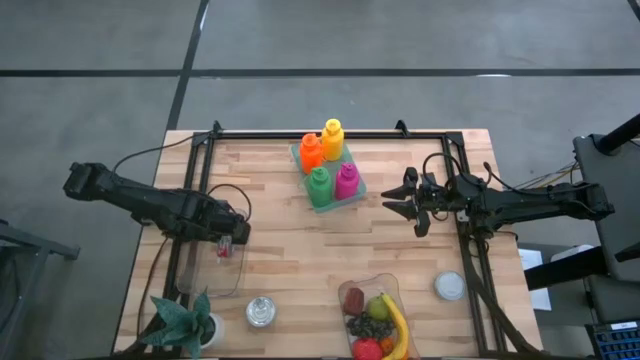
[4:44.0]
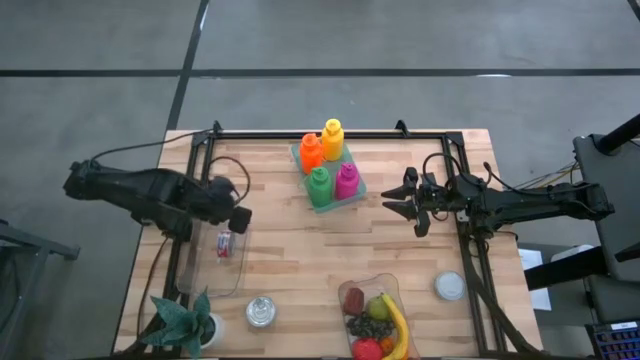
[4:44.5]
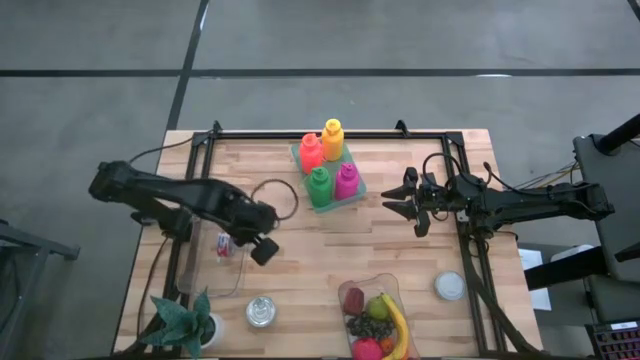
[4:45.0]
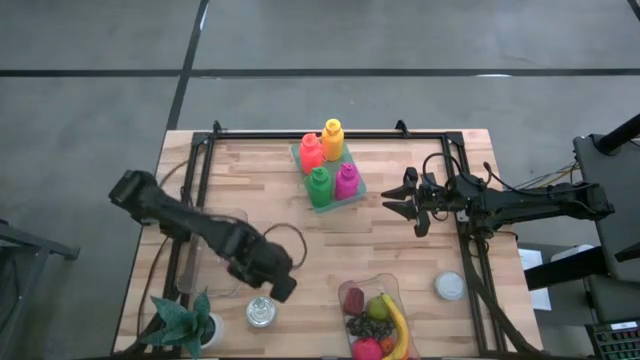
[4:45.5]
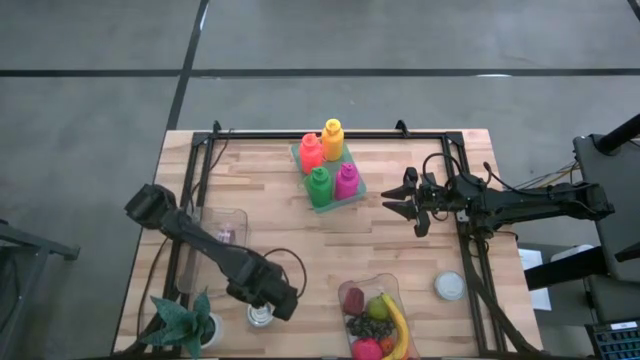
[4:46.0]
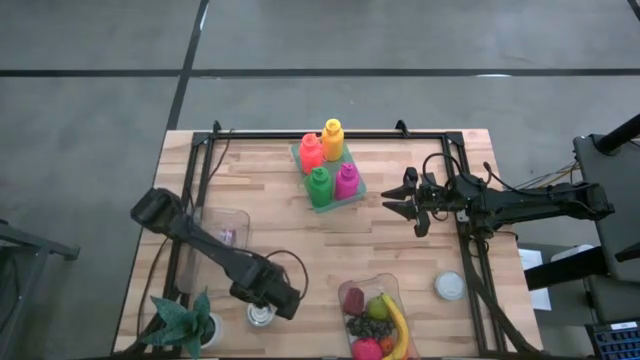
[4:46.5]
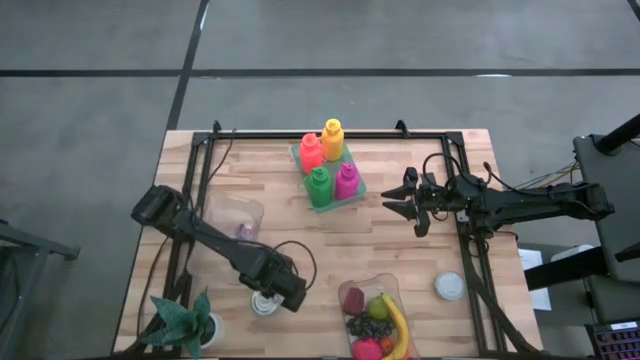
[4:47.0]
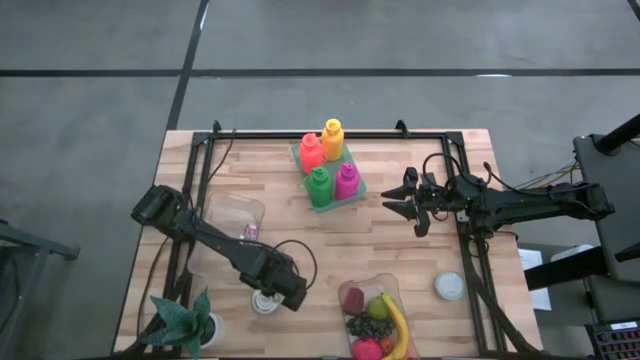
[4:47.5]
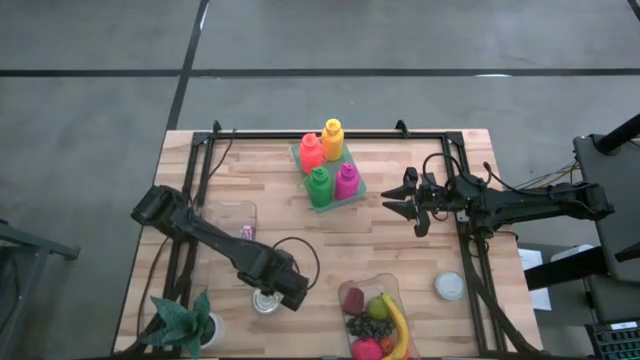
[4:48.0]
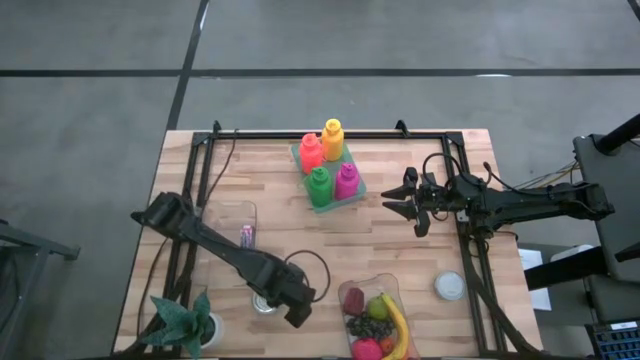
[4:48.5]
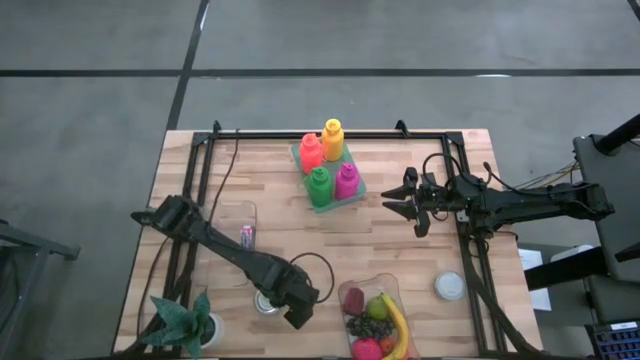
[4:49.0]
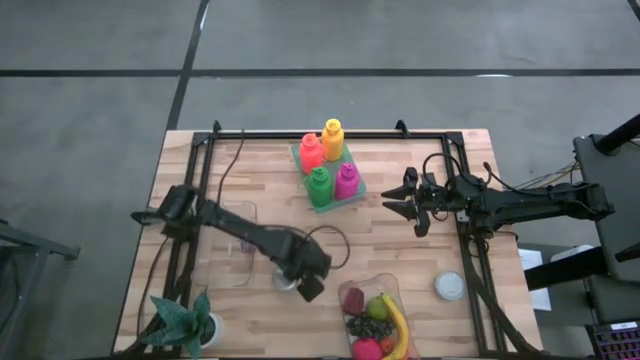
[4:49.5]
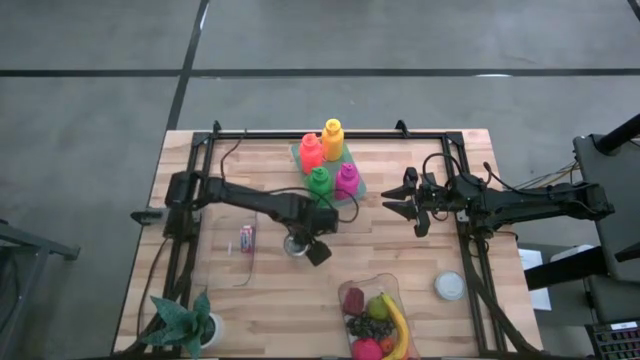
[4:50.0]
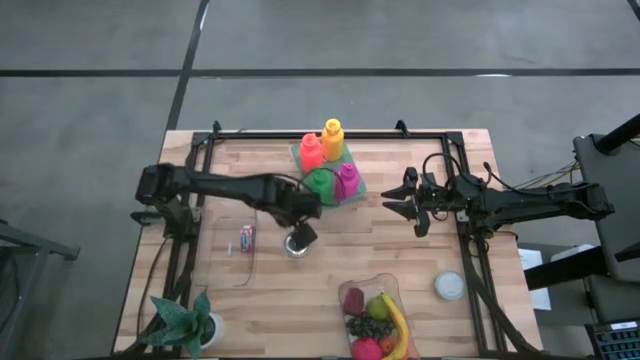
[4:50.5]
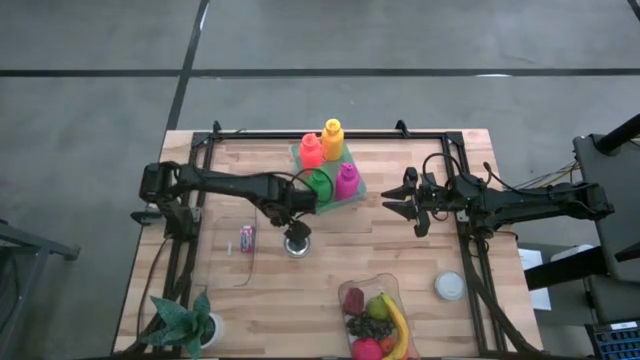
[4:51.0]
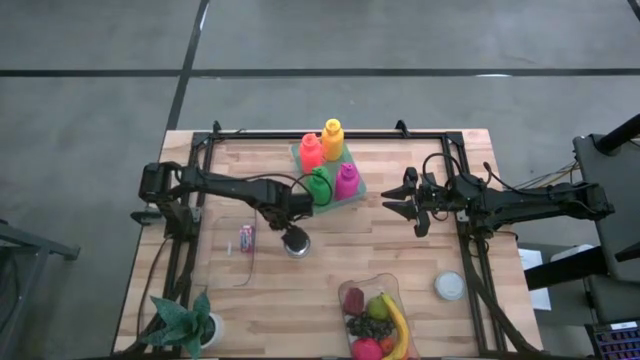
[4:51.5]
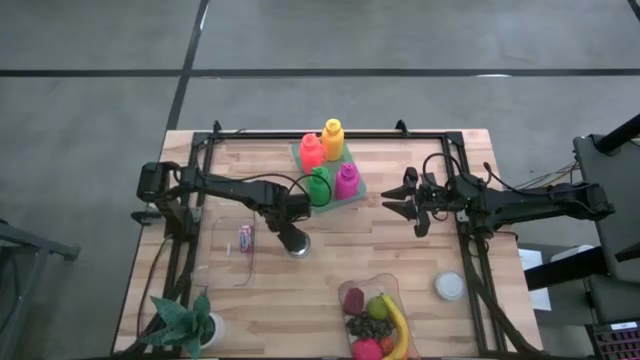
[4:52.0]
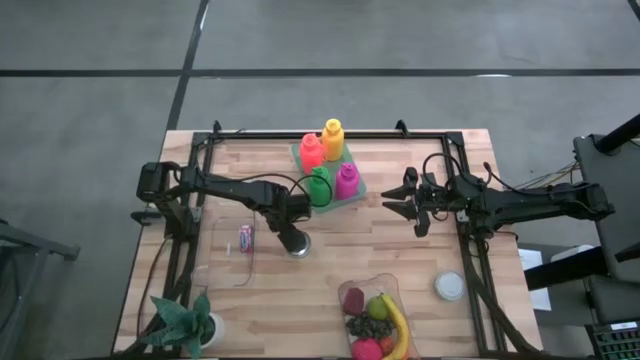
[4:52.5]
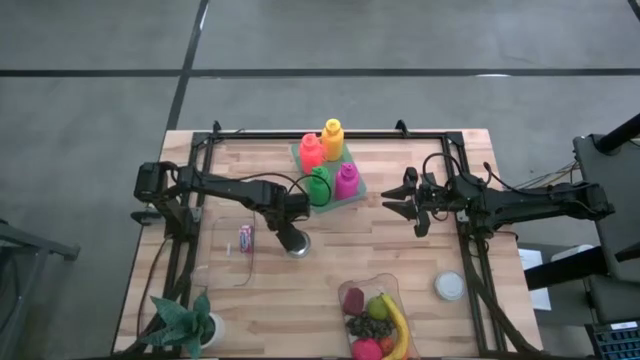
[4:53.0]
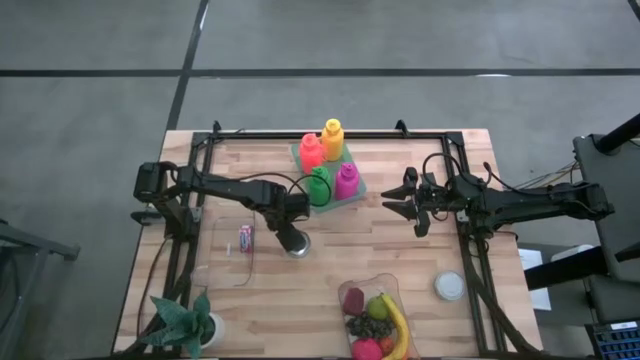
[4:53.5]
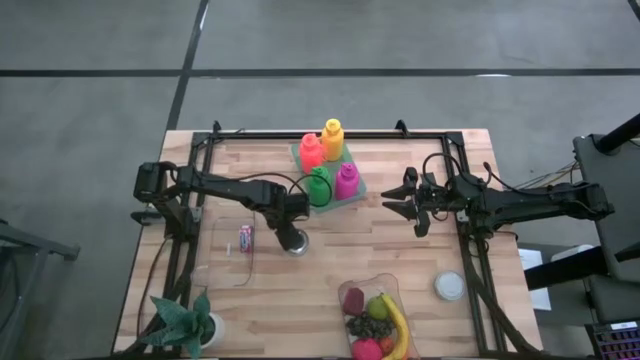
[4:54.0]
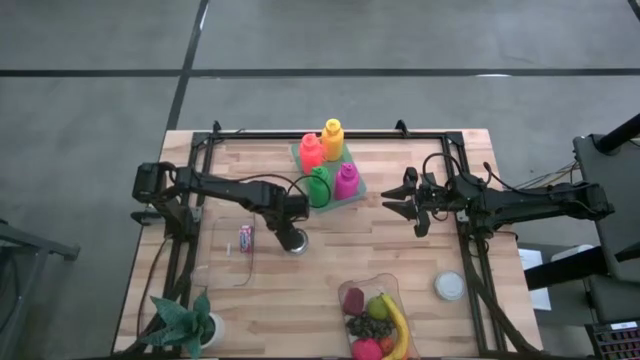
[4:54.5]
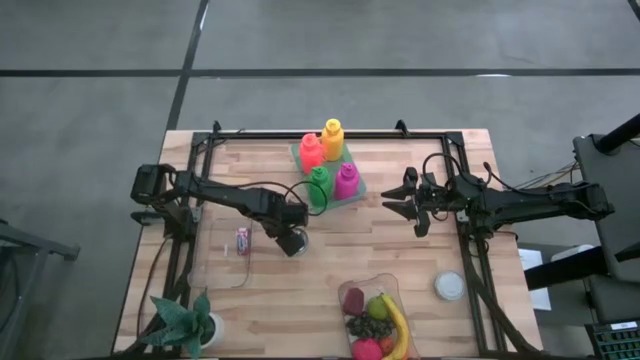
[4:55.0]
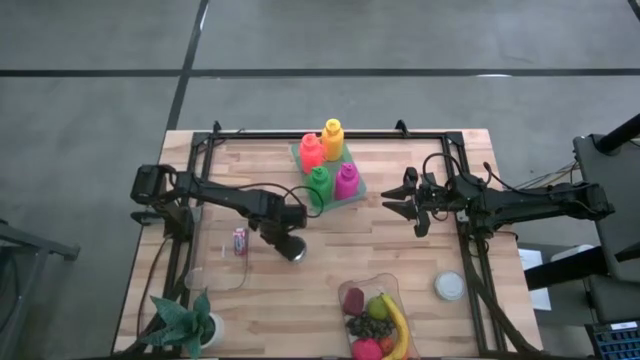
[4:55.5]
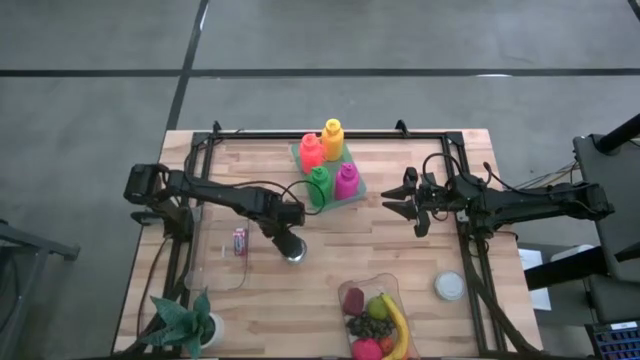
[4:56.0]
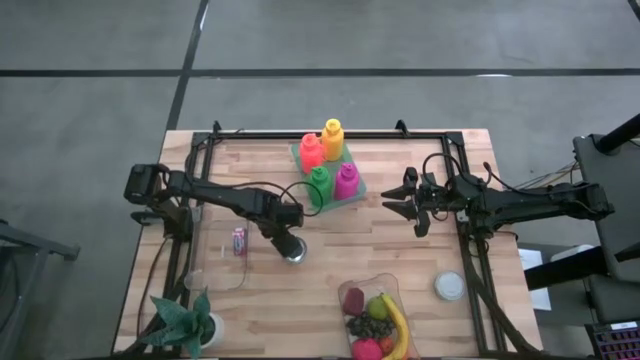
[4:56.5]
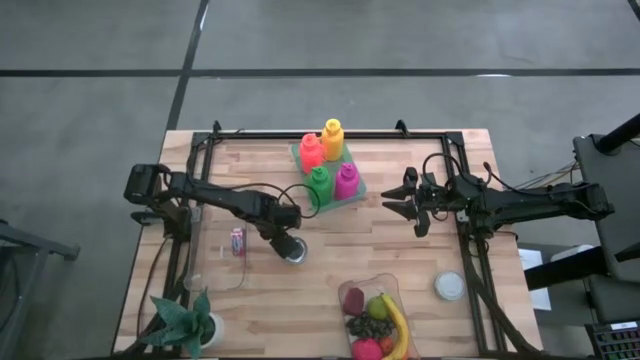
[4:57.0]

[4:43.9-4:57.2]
Task: Pick & Place Food Item
Put the green tuna into the top transparent bin

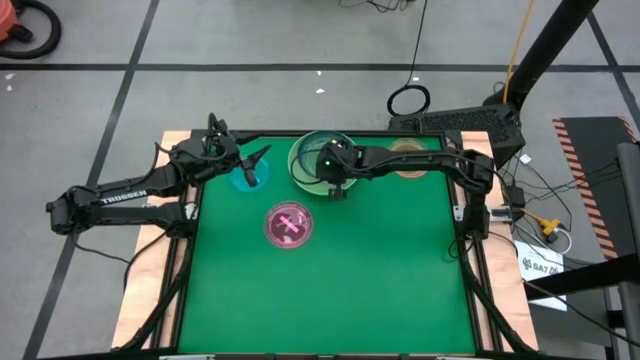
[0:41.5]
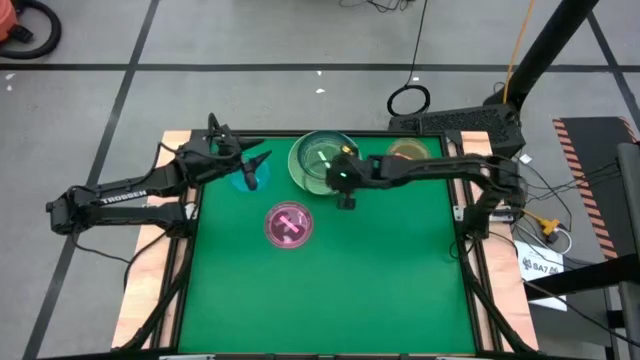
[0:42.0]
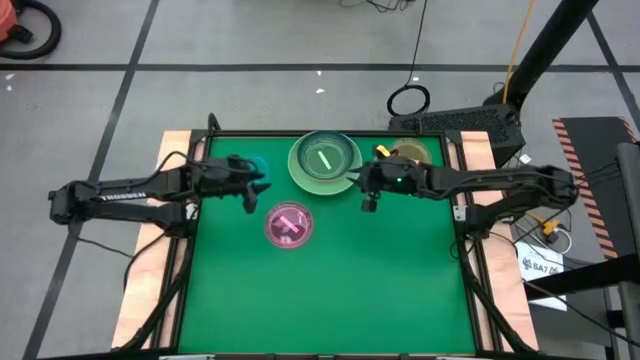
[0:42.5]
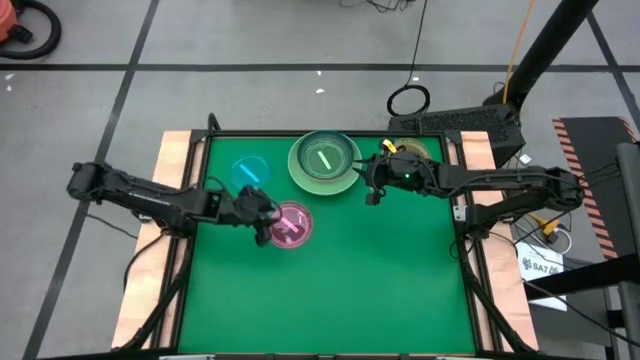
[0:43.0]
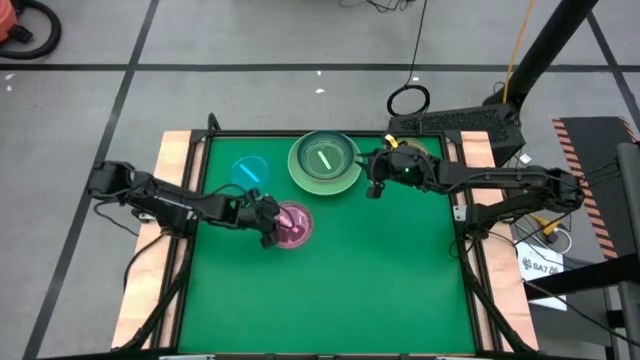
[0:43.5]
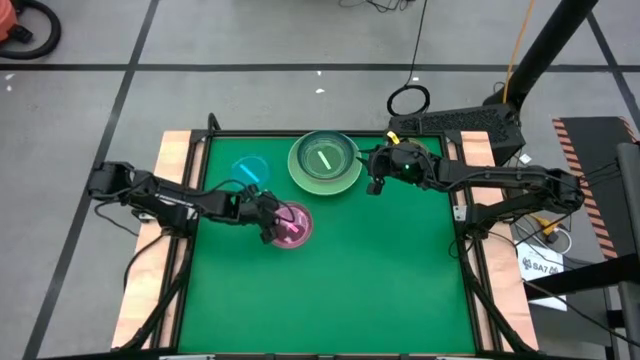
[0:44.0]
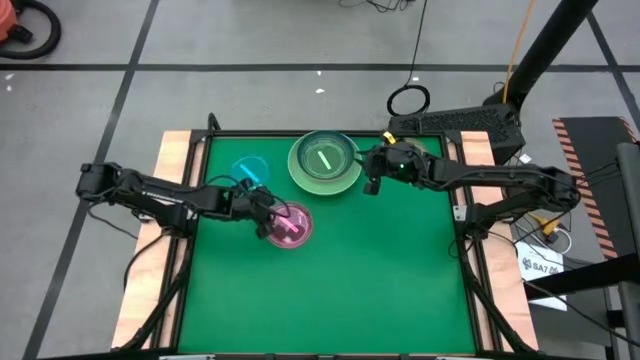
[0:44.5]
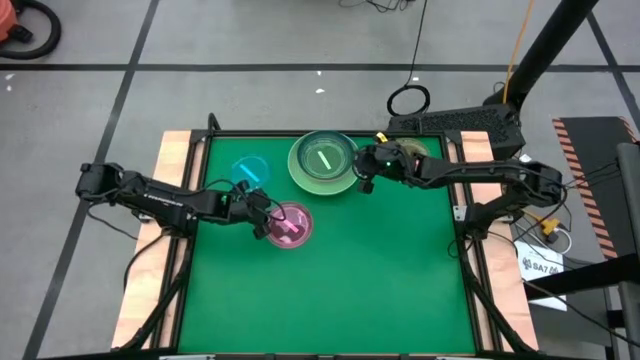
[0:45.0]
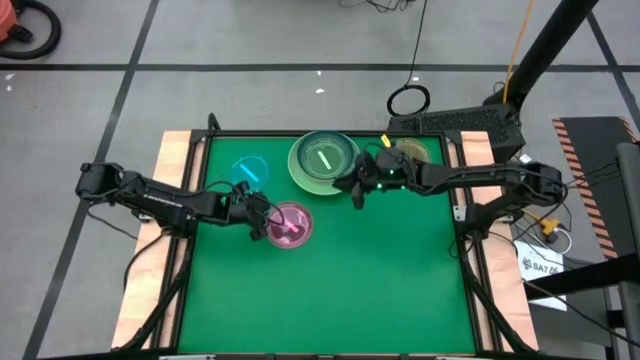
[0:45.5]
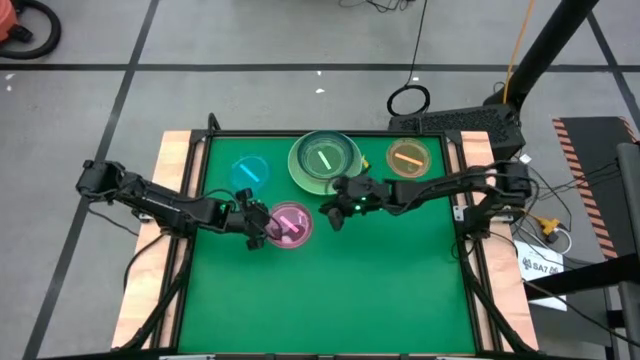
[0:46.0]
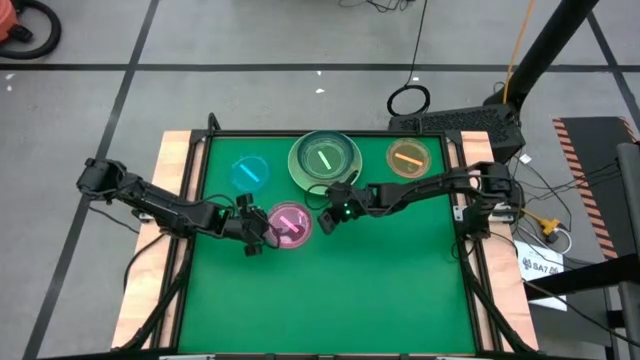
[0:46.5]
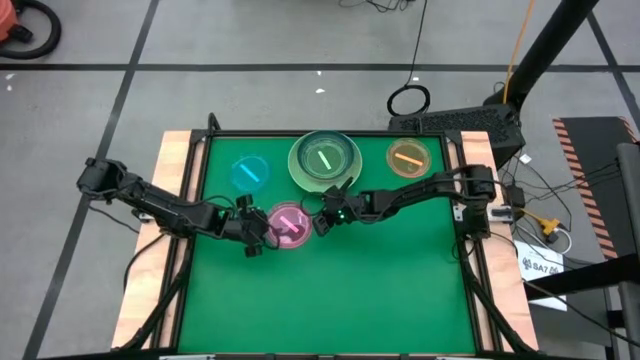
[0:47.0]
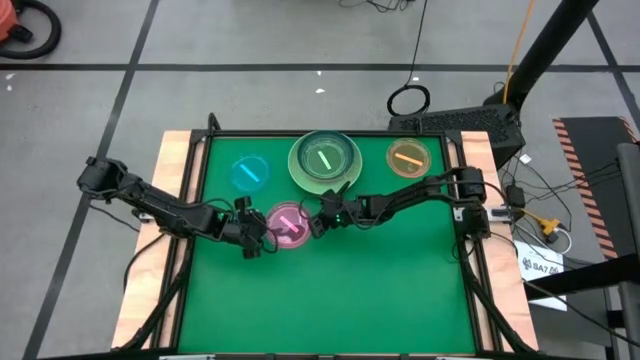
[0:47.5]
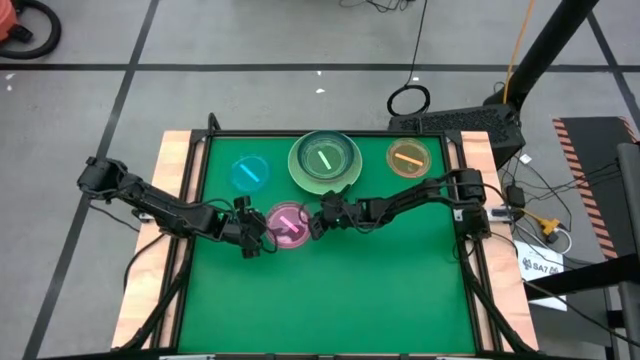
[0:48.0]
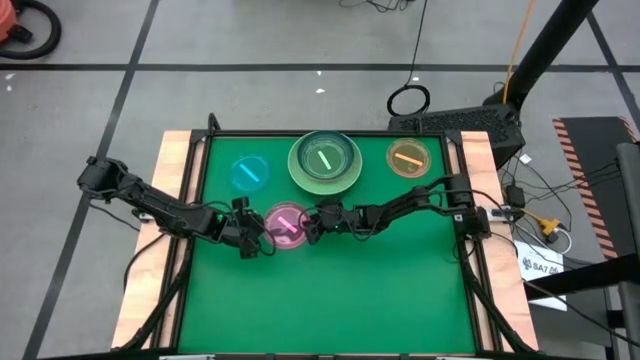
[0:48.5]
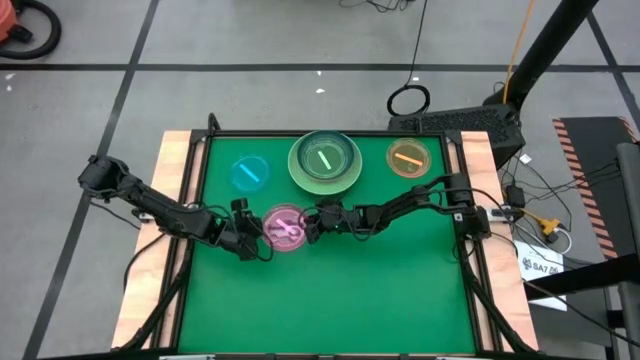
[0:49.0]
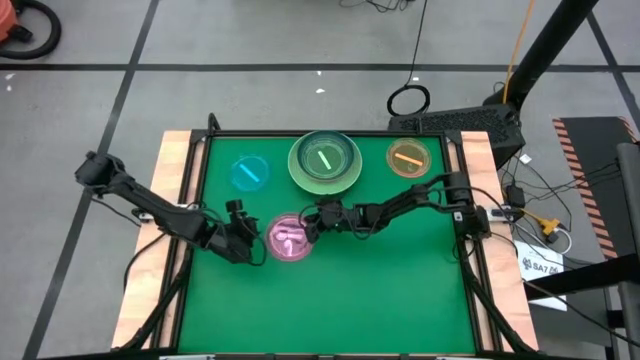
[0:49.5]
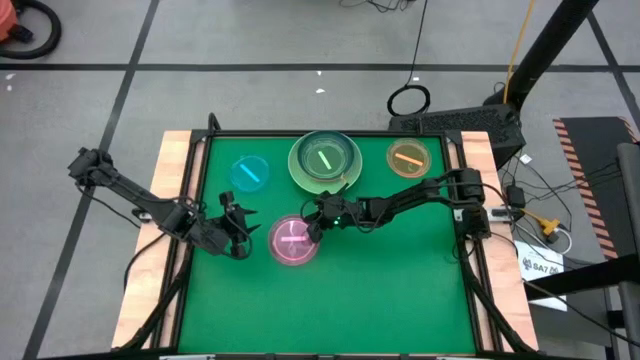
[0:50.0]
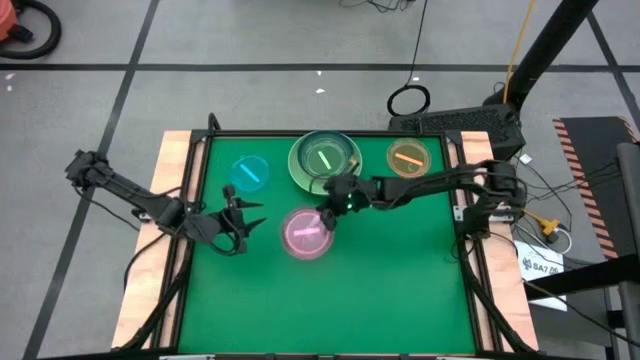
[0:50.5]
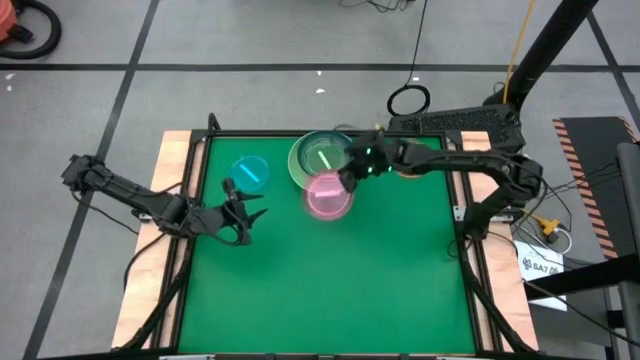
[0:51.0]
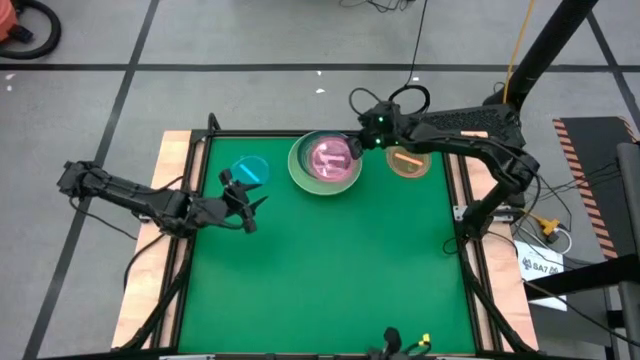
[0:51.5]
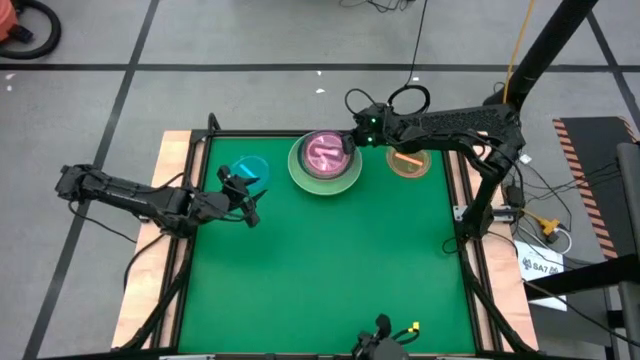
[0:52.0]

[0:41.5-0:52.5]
Task: Stack plastic plates
Stack the pink plate on top of the green plate
